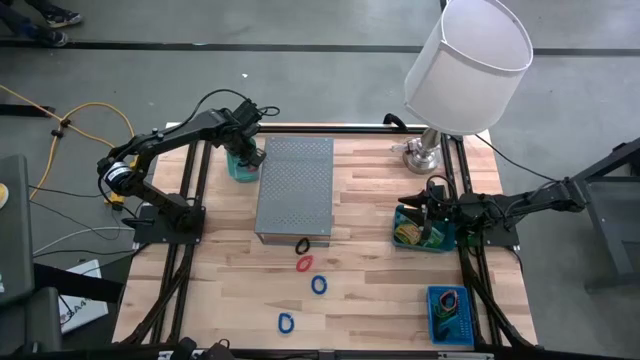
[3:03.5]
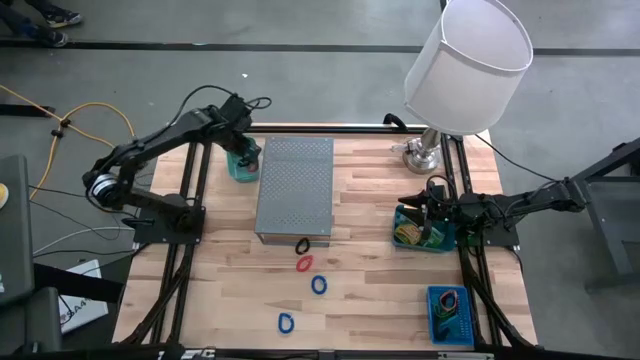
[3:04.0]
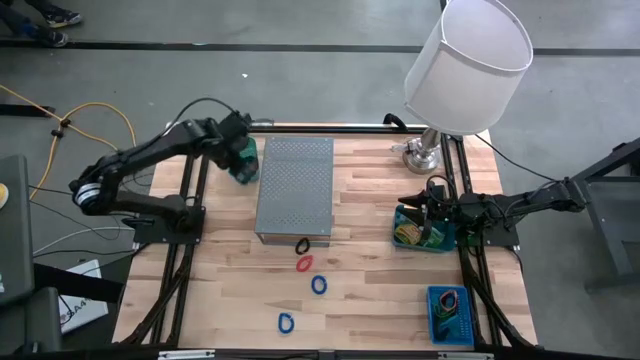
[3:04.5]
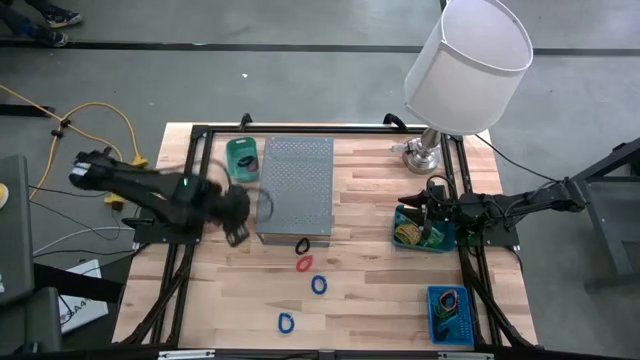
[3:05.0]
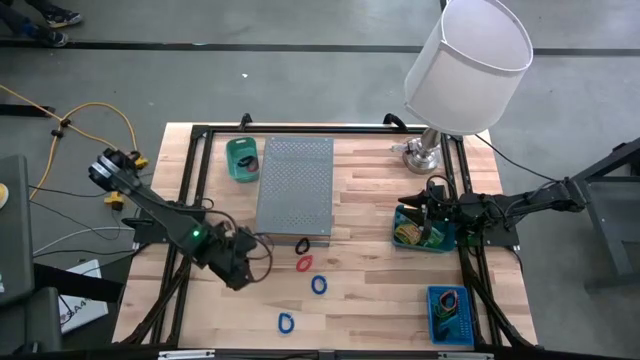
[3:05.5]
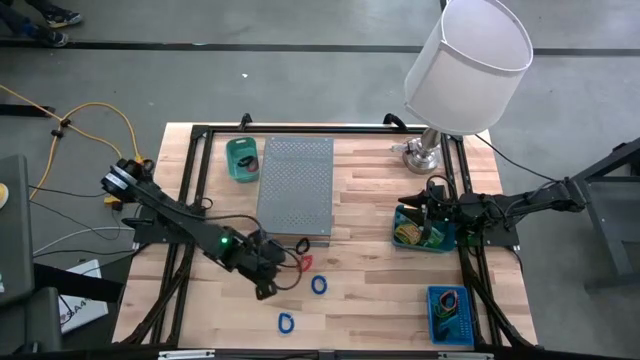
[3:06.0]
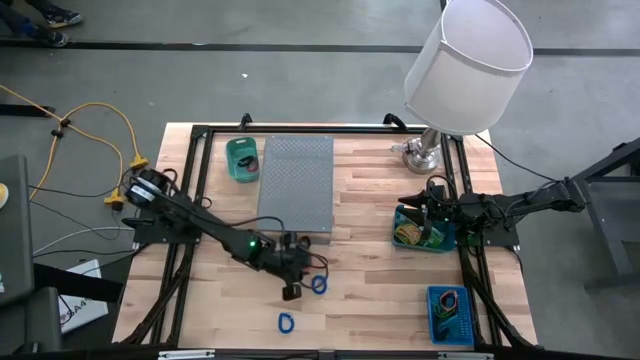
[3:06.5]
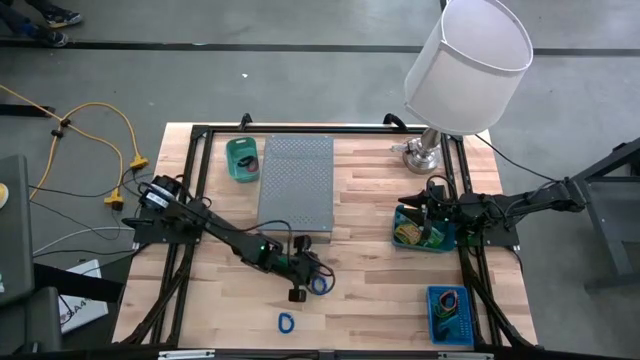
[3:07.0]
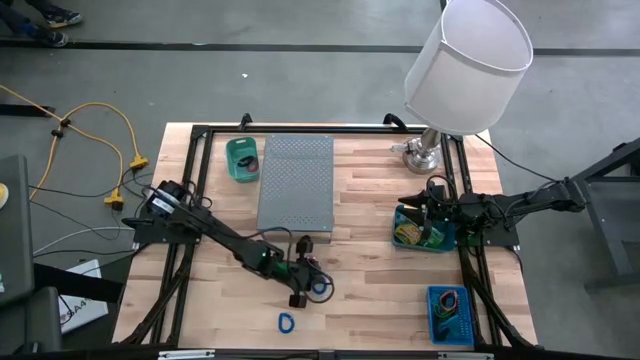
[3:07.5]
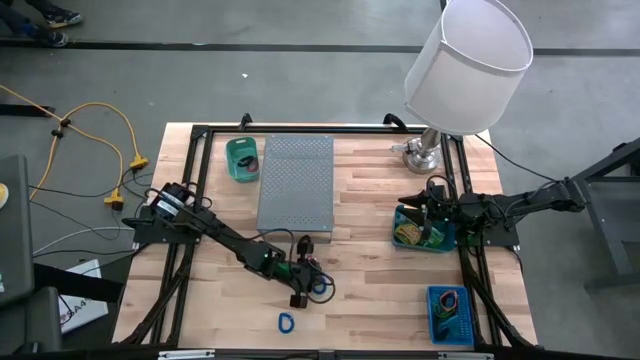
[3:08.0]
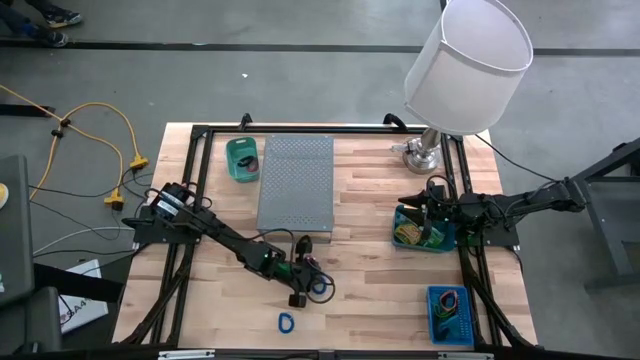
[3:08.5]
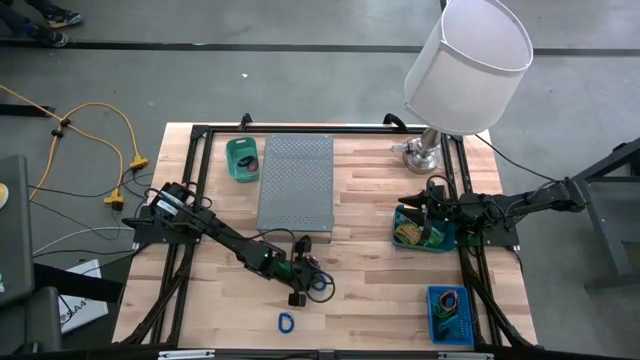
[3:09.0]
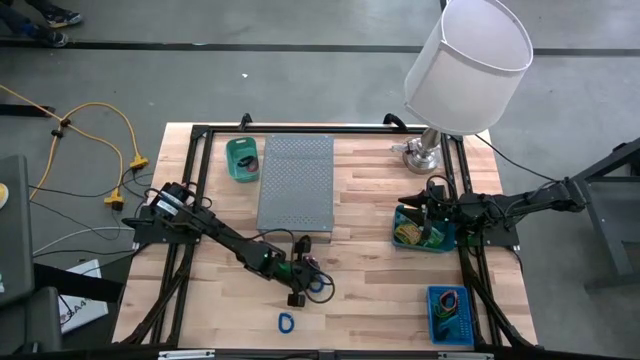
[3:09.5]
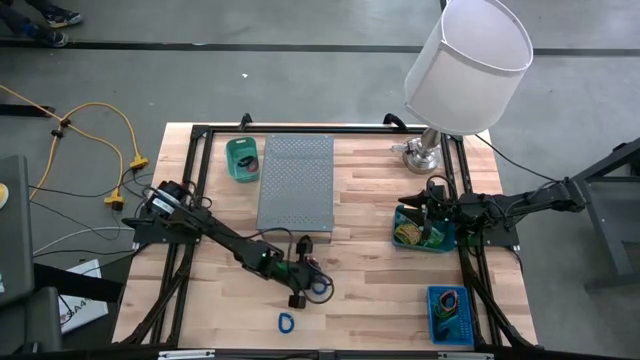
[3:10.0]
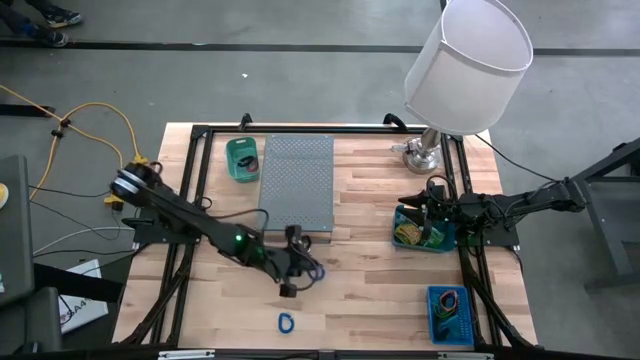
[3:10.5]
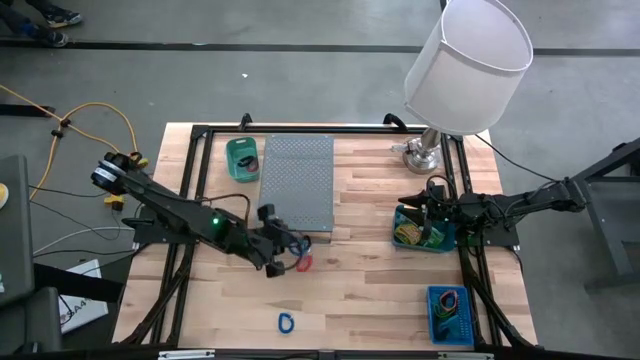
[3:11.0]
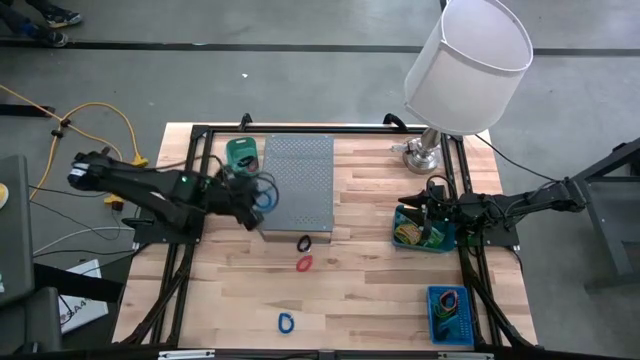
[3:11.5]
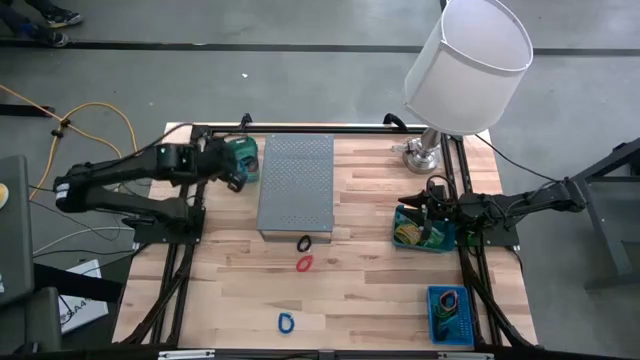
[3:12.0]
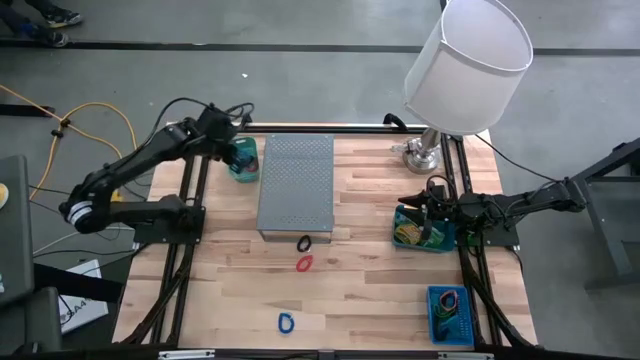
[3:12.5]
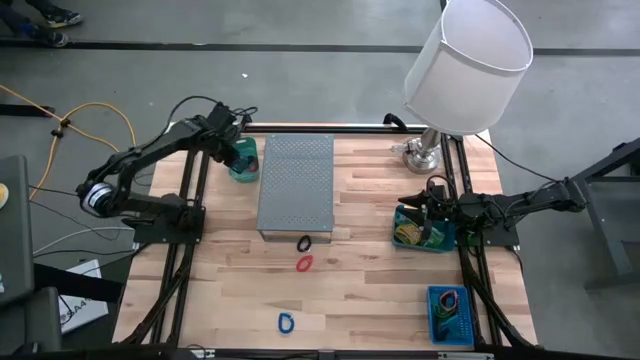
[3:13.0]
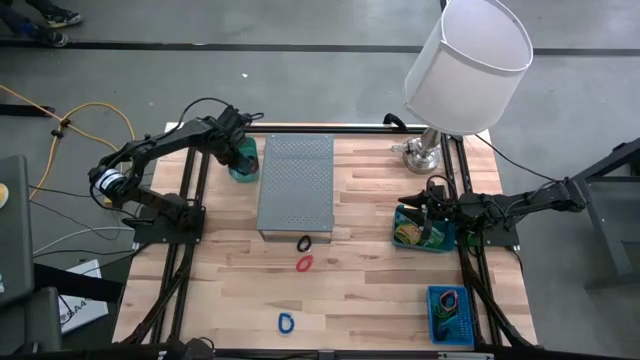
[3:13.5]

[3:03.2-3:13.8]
Task: Pick & Place Office Desk Supplies
Put the top blue spring keychain into the dark green bin

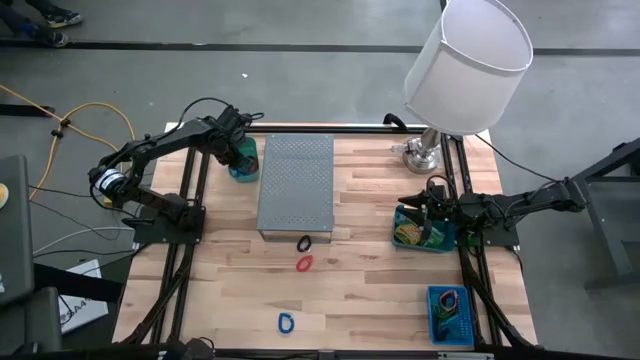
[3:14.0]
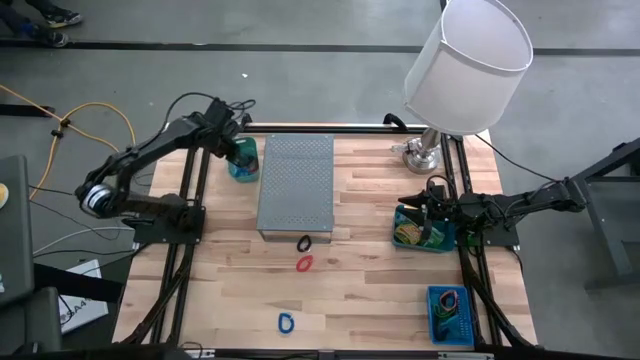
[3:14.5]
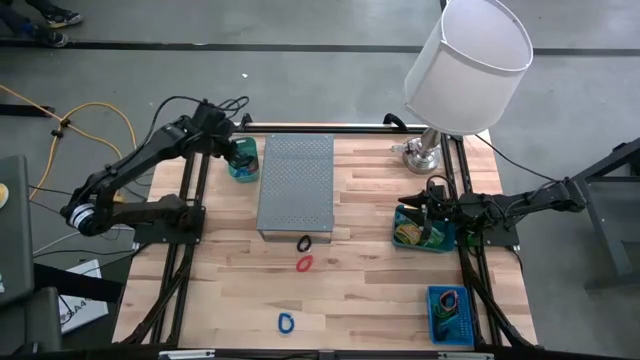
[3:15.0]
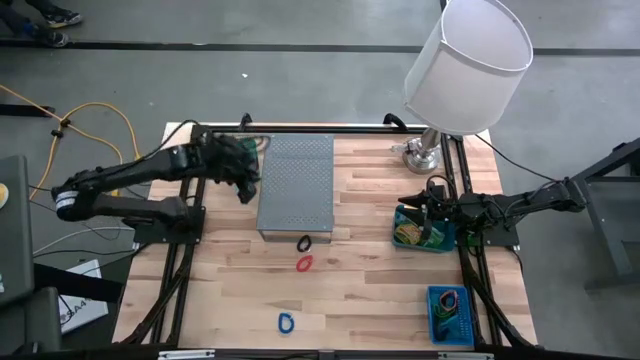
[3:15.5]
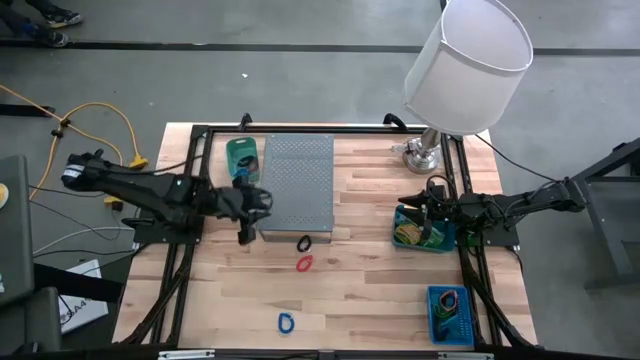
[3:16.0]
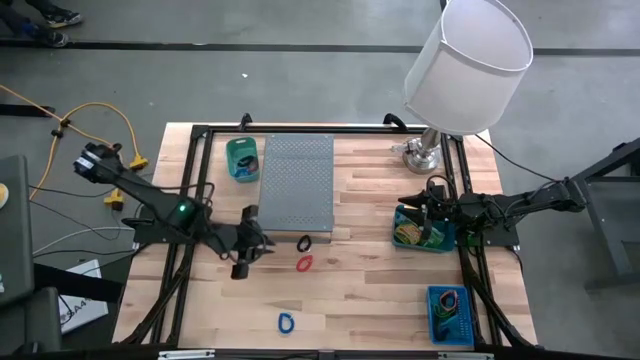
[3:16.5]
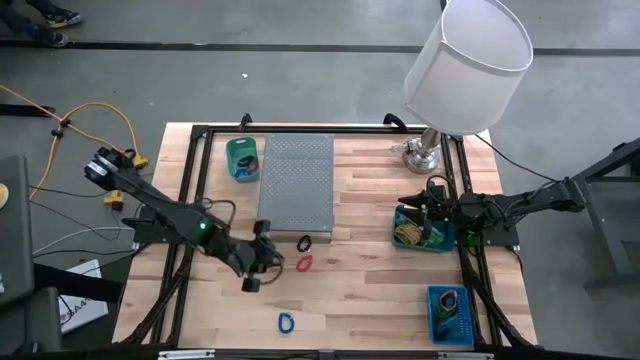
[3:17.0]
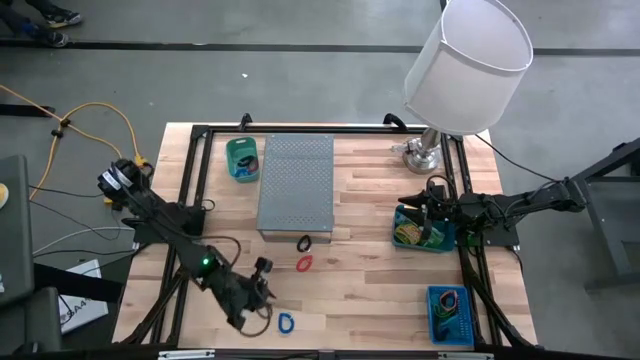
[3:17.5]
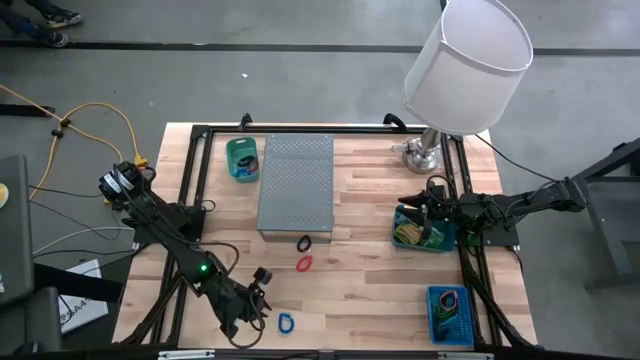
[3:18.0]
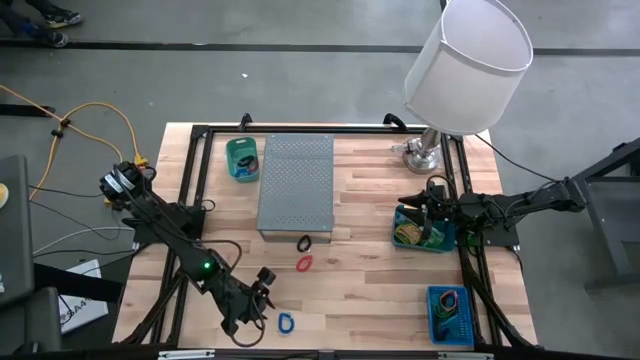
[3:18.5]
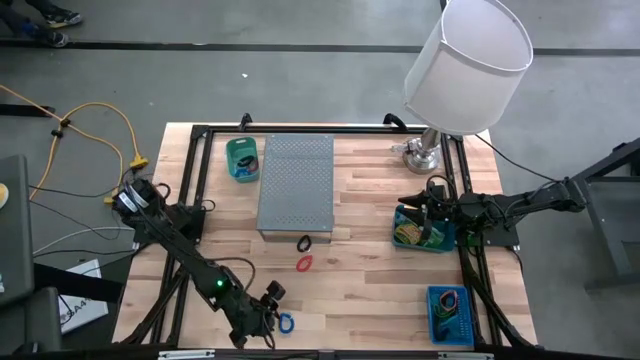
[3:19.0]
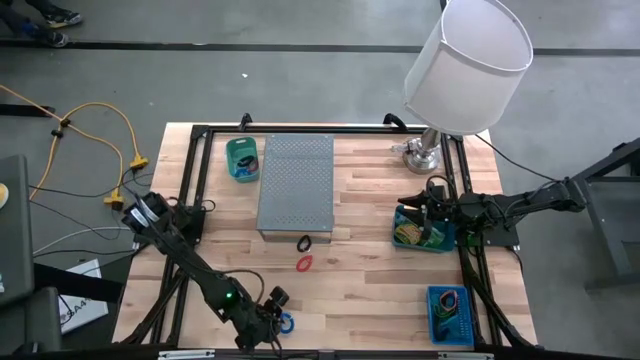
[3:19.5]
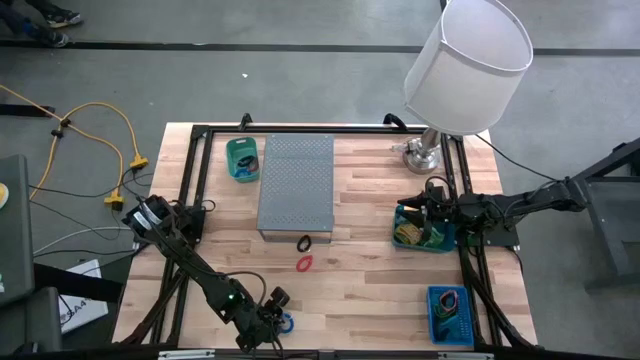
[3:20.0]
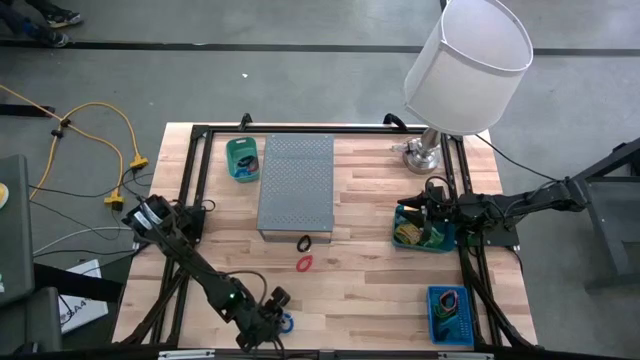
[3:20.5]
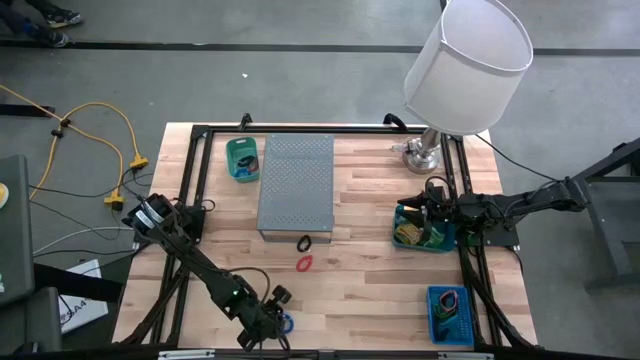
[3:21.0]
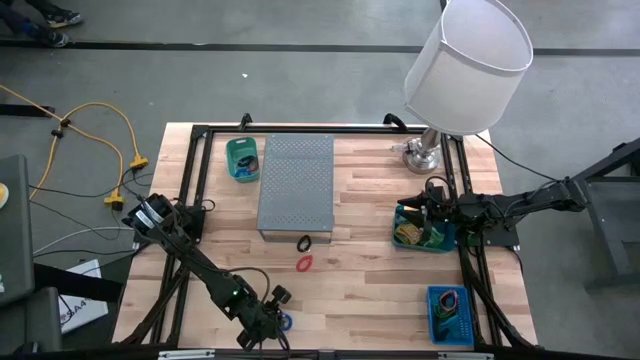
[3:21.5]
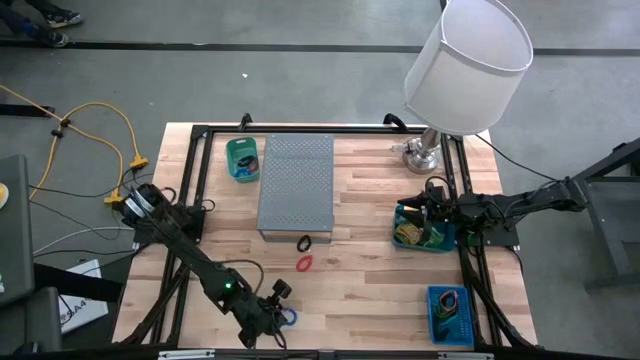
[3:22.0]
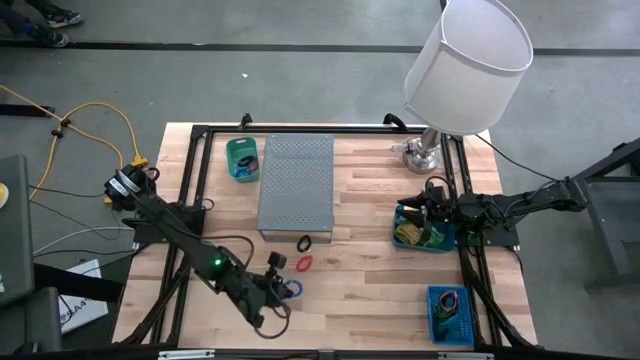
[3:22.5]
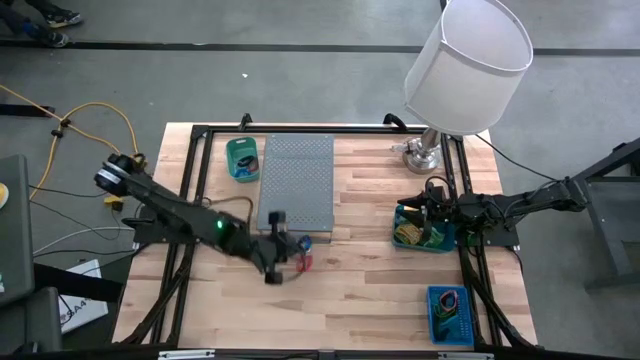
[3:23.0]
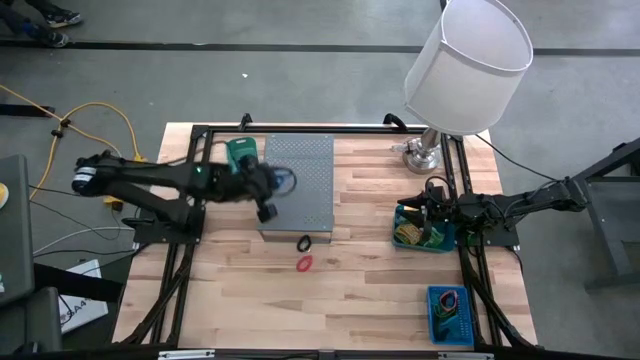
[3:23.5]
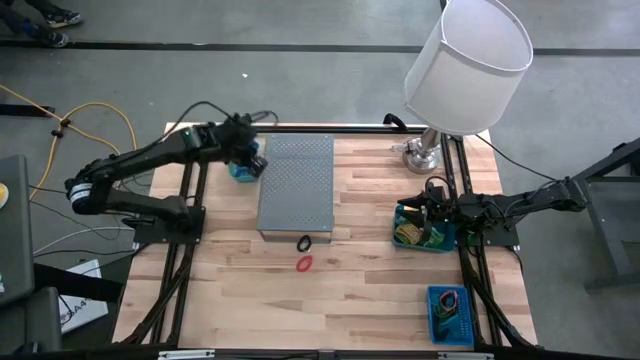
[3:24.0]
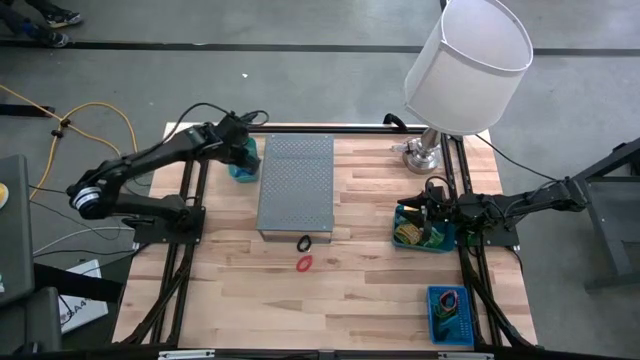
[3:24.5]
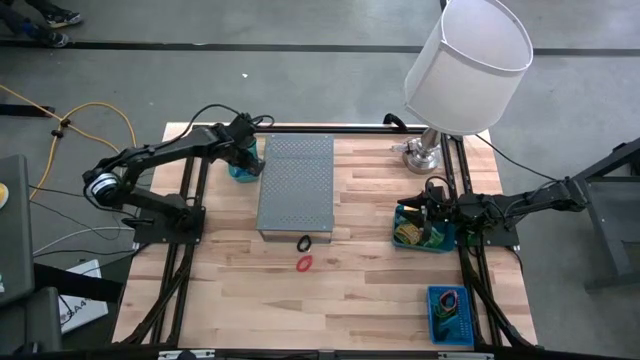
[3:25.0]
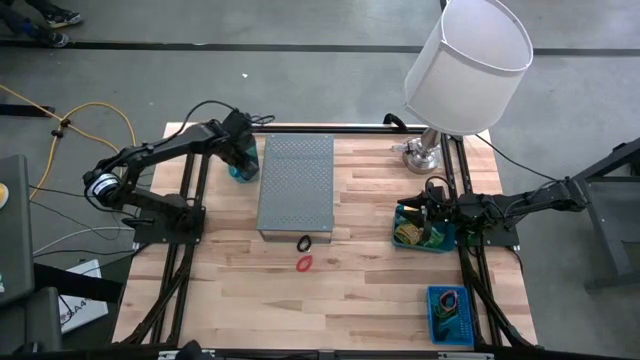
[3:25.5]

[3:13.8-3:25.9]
Put the blue spring keychain into the dark green bin
